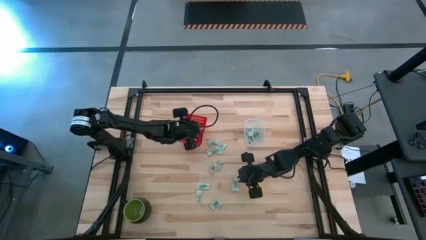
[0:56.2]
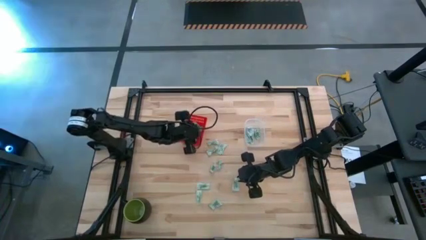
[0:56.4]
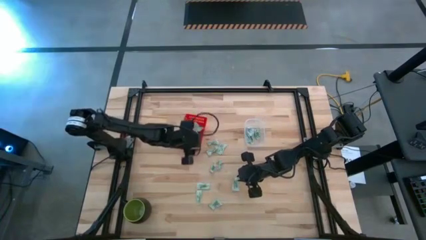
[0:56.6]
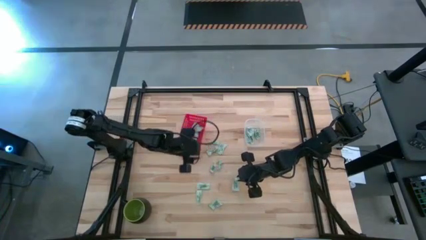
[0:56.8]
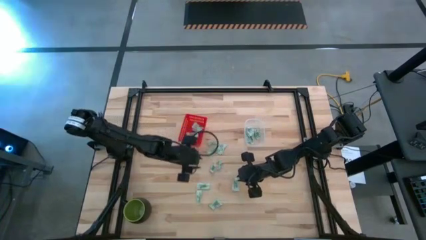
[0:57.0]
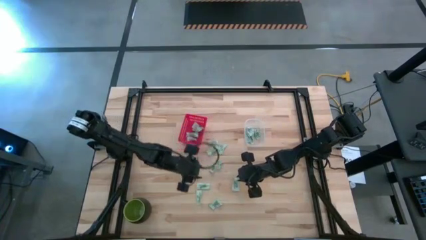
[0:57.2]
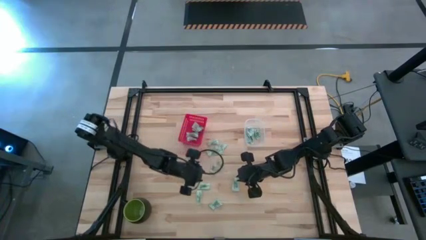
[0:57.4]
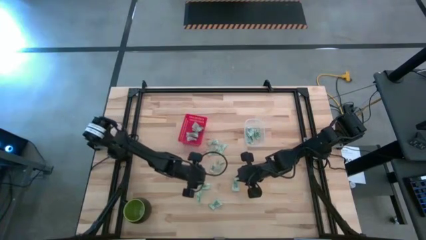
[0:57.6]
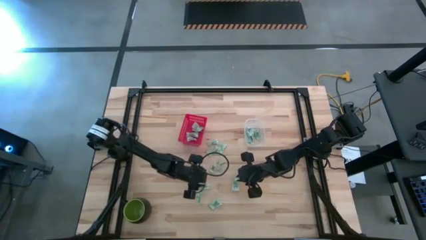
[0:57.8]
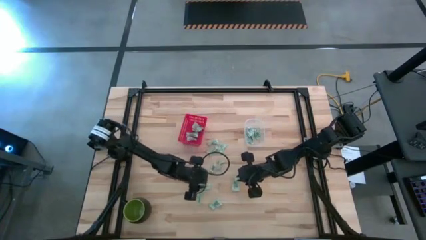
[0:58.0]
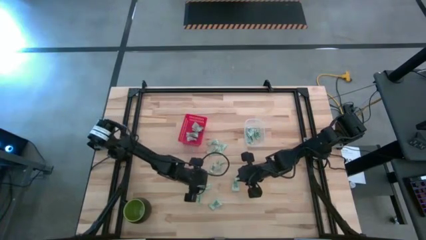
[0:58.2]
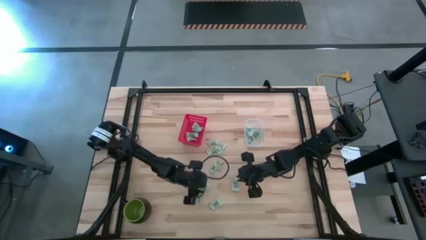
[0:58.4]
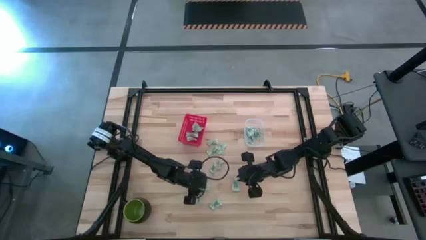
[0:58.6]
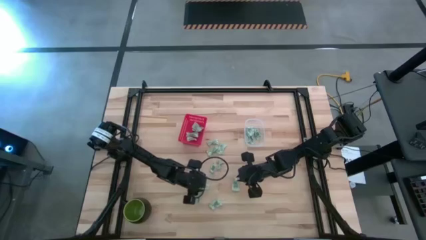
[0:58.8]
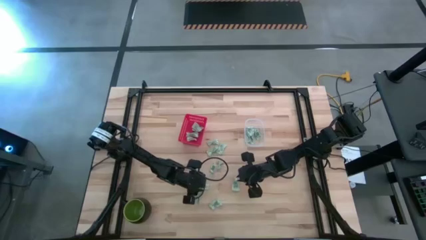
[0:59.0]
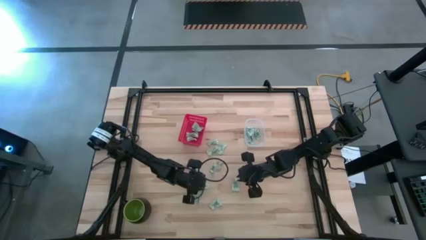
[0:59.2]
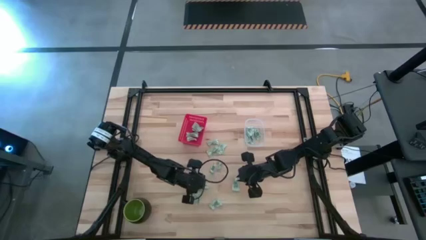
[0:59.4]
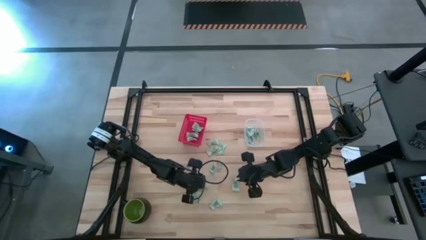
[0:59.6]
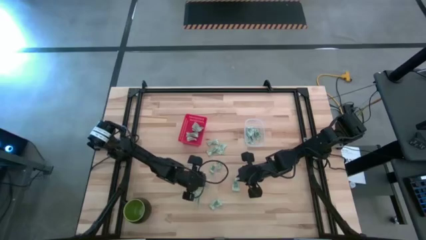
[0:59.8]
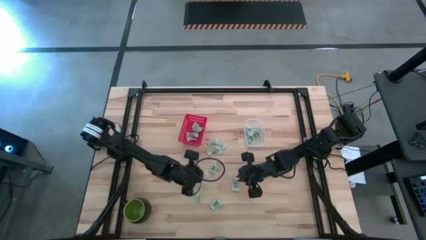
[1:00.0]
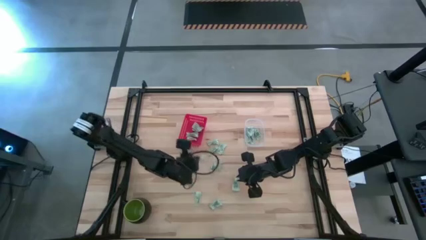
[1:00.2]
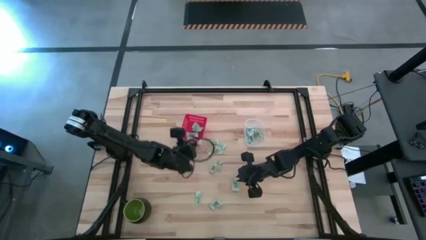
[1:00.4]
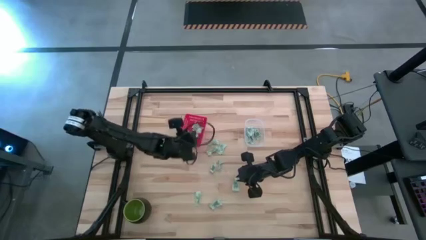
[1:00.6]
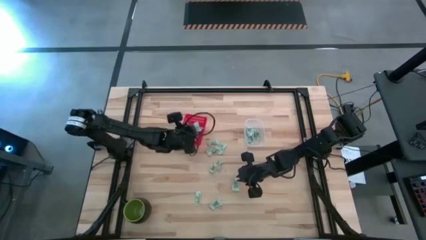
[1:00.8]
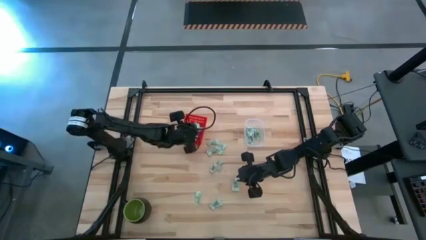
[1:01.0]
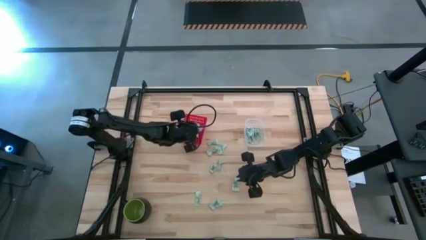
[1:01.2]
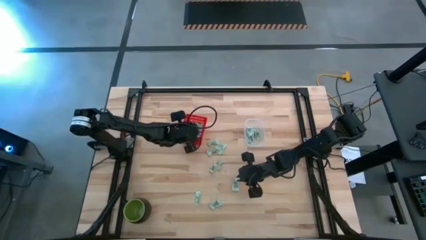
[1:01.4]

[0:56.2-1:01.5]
Task: Pick and place items into bin
Put the stevia packet into the red bin

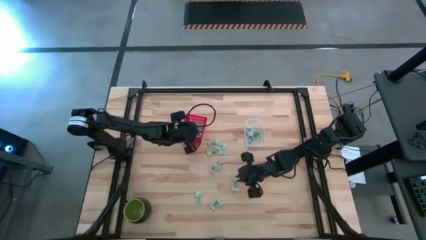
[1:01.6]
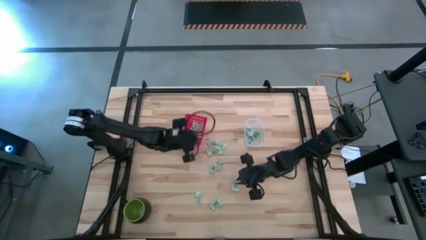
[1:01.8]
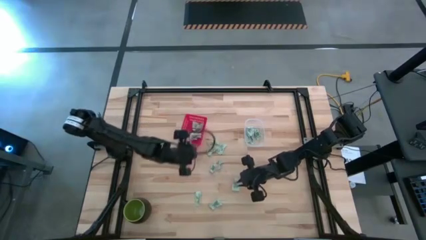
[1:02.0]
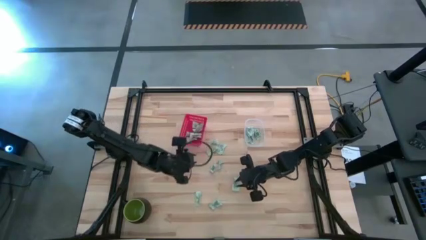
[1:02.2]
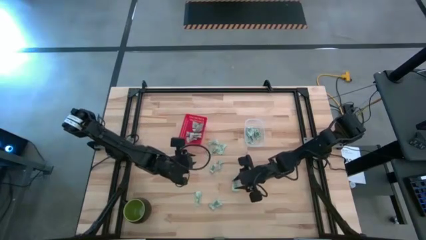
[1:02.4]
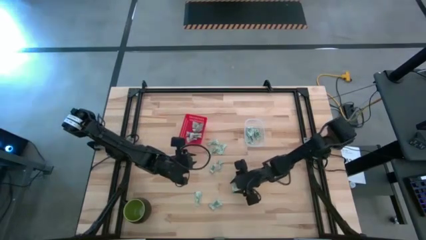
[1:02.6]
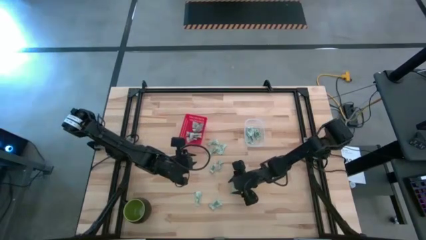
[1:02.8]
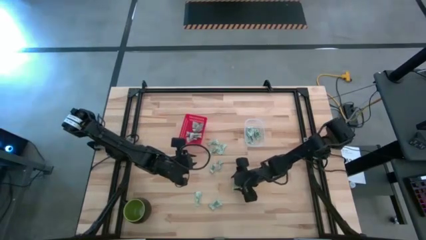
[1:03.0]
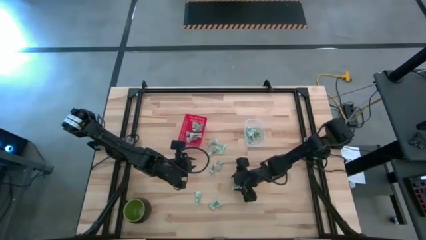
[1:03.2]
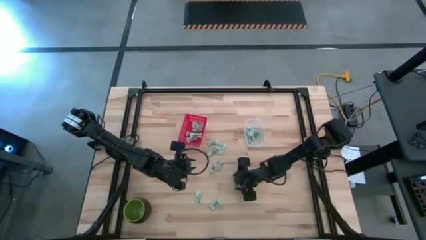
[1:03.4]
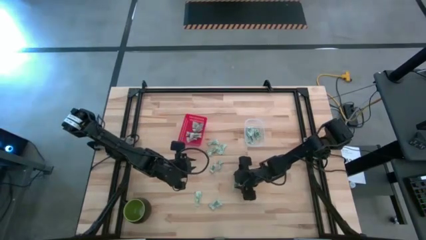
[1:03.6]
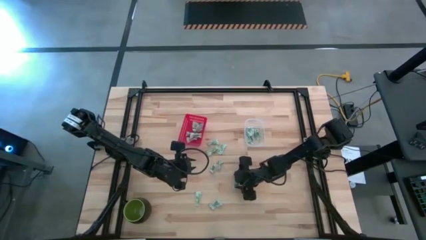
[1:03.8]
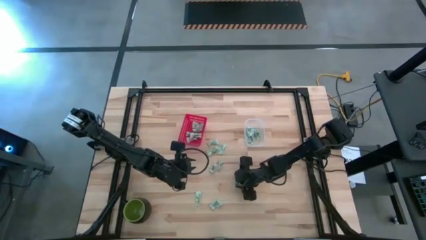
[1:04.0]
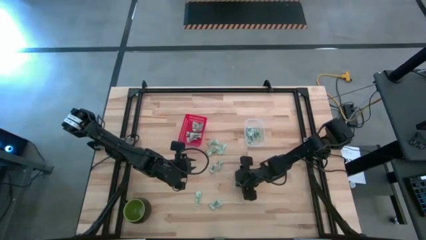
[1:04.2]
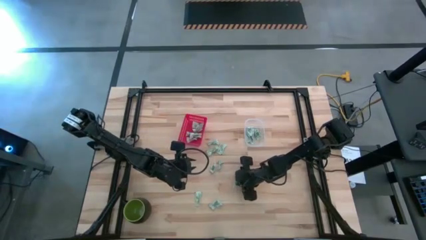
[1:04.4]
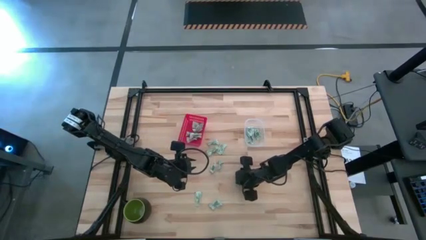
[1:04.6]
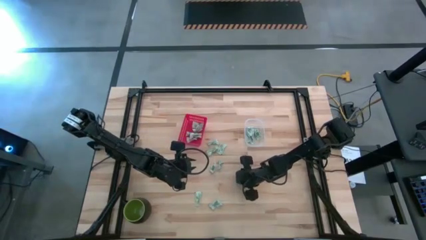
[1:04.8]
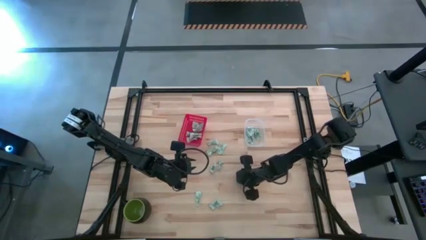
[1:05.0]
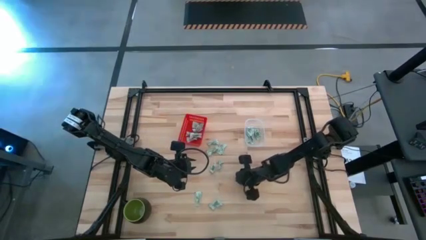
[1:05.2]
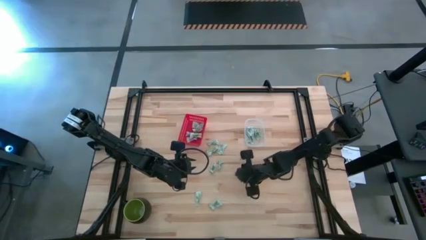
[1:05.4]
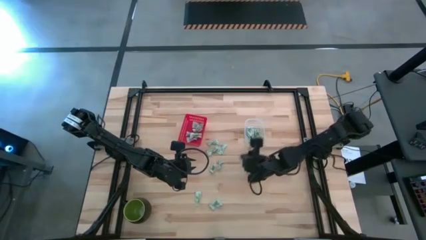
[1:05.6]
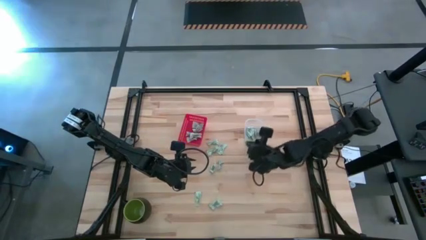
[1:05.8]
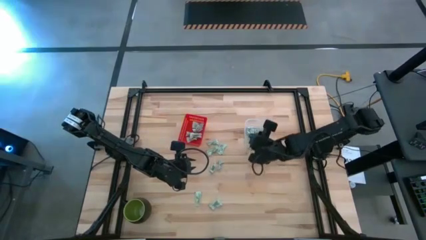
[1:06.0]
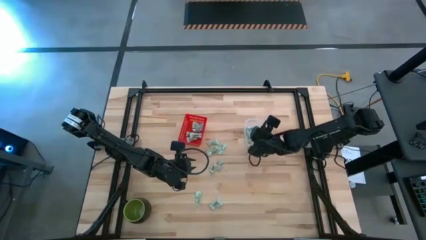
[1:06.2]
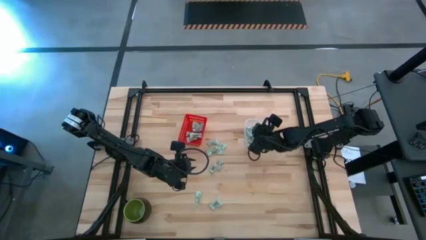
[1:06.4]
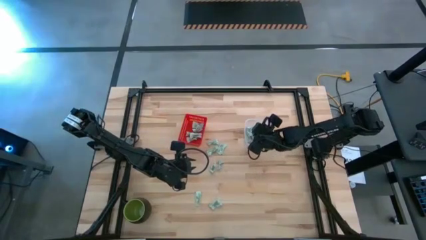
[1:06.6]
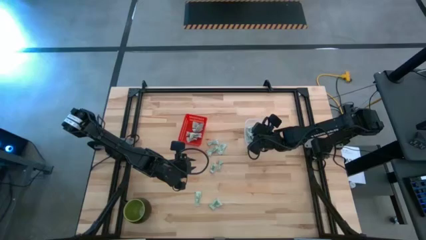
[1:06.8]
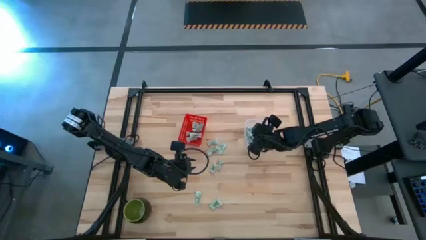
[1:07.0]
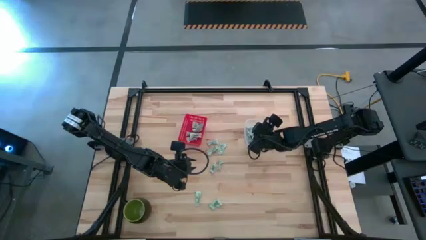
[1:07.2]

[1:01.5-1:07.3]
Put the stevia packet into the transparent bin

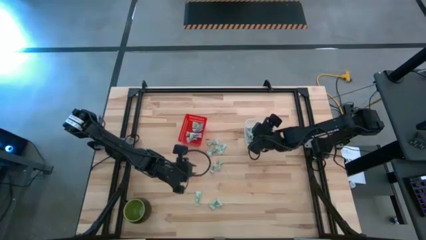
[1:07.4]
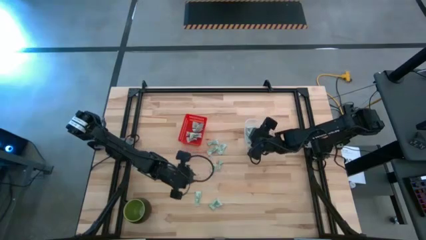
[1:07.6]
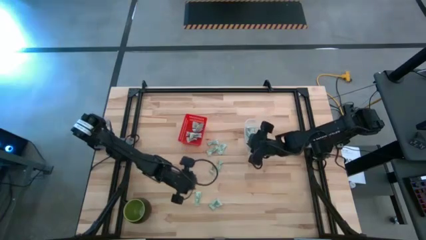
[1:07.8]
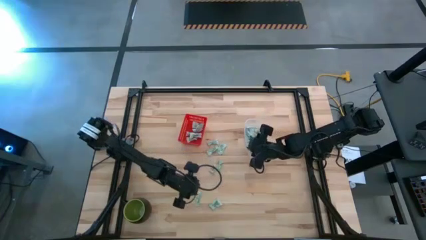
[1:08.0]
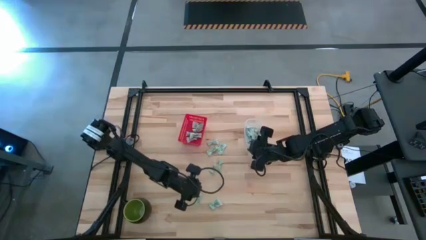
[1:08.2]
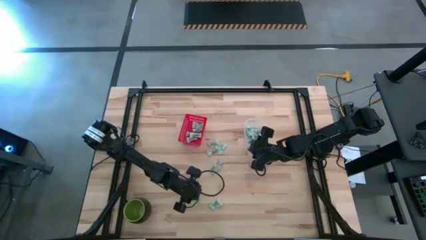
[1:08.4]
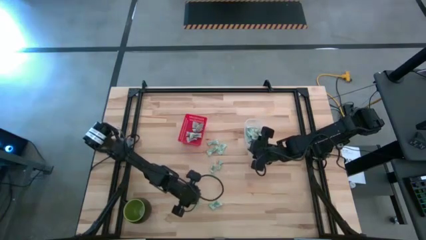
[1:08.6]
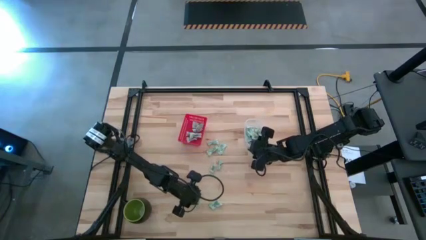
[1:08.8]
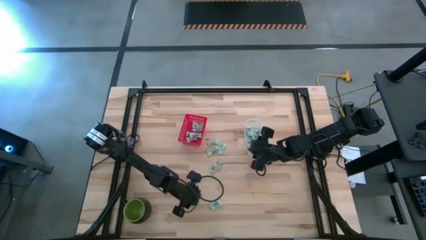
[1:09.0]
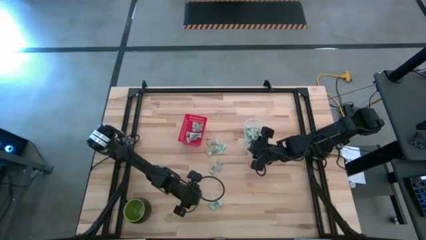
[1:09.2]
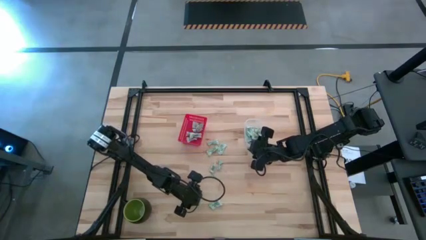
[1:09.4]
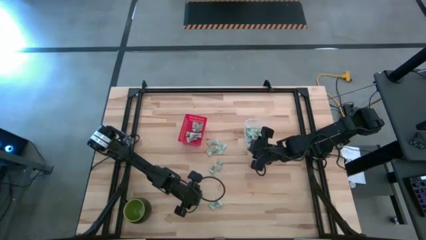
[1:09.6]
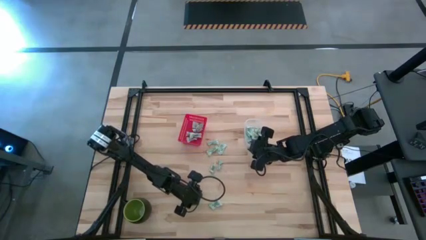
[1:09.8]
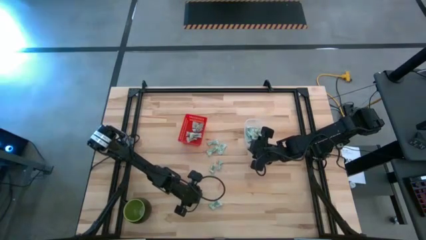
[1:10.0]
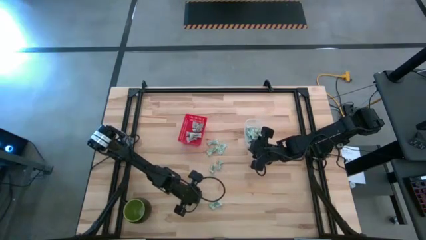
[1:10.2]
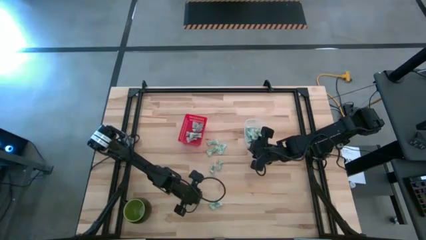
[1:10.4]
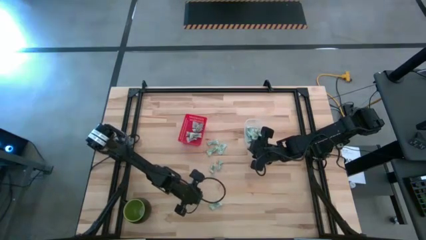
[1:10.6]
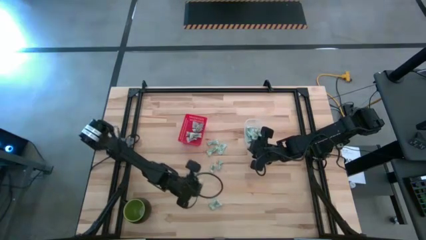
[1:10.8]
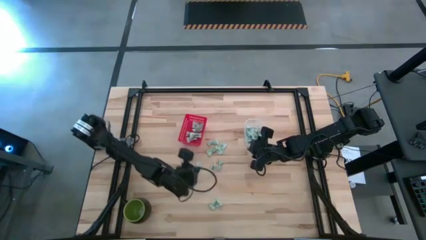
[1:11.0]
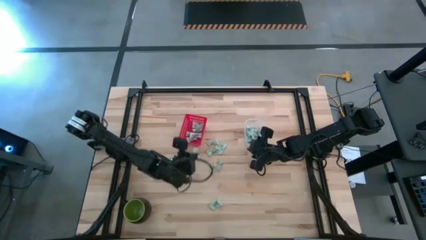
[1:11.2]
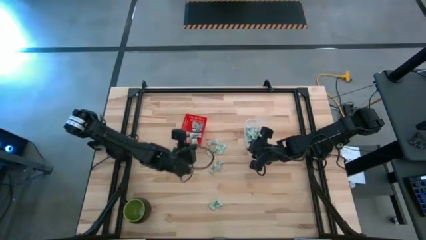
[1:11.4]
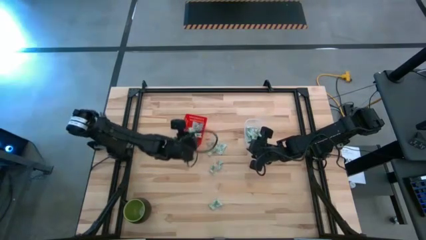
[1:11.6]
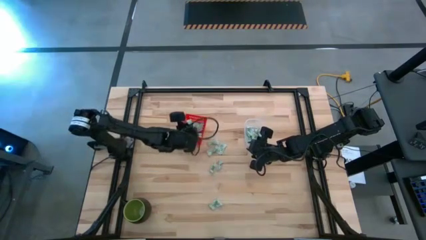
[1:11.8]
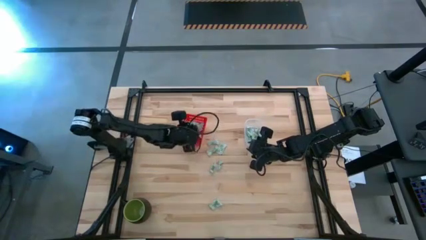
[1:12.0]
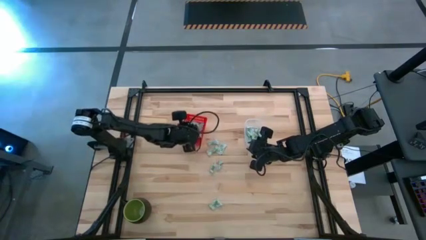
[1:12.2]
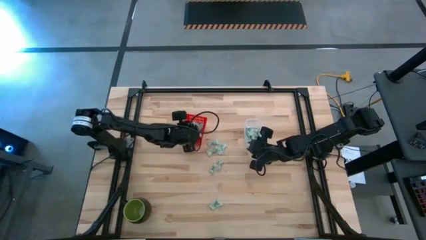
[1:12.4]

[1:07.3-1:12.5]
Put the stevia packet into the red bin

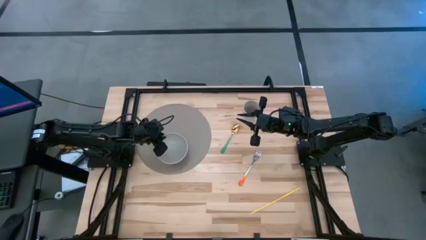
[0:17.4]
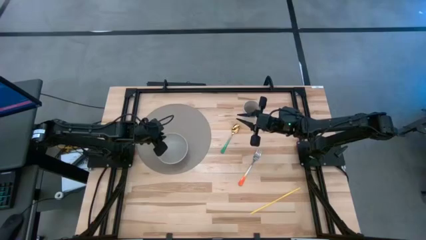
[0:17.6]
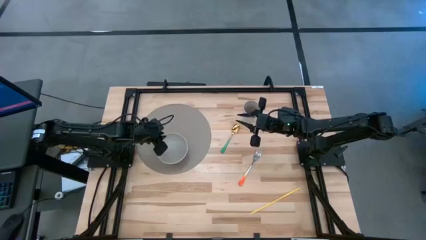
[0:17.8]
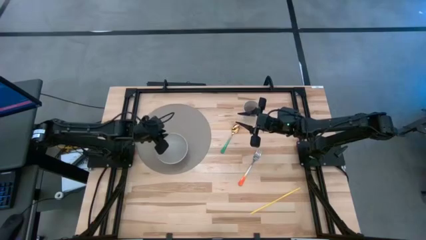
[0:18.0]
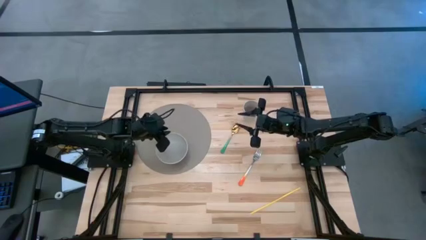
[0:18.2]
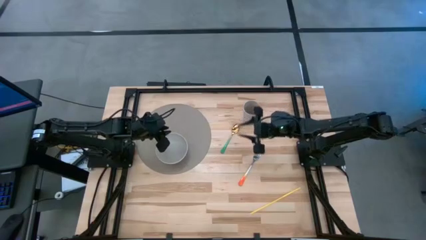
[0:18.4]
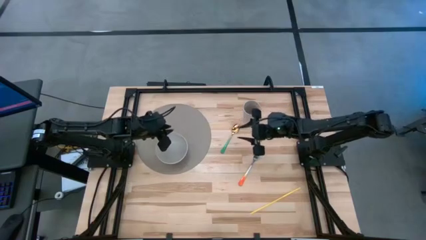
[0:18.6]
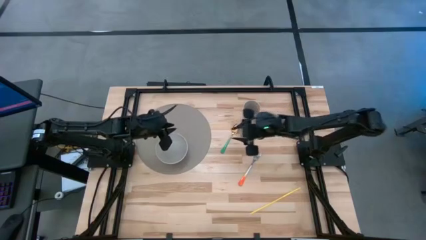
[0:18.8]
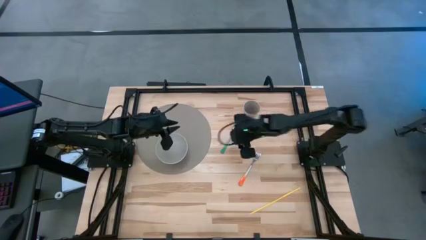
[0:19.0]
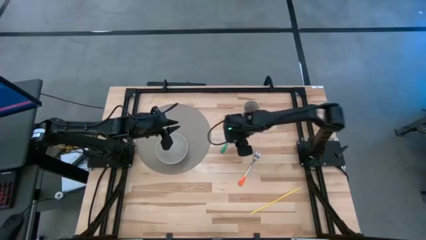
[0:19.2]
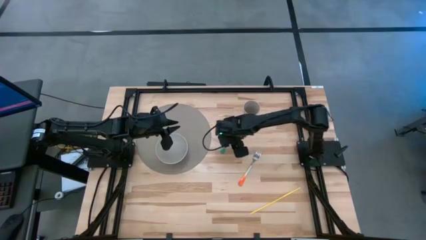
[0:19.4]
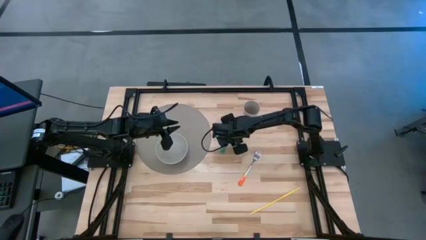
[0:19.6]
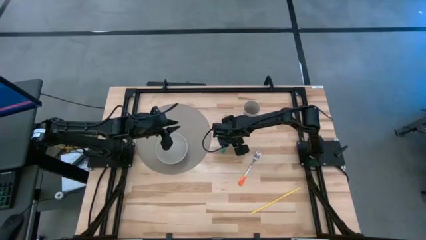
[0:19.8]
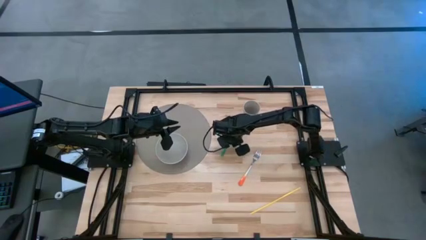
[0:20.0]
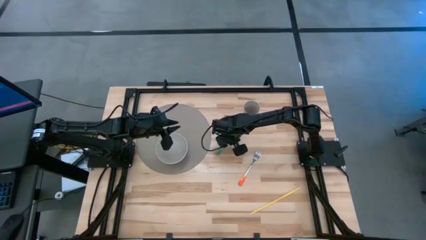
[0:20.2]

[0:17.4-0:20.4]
Task: Pick & Place Utensil
Put the green spoon into the white bowl
